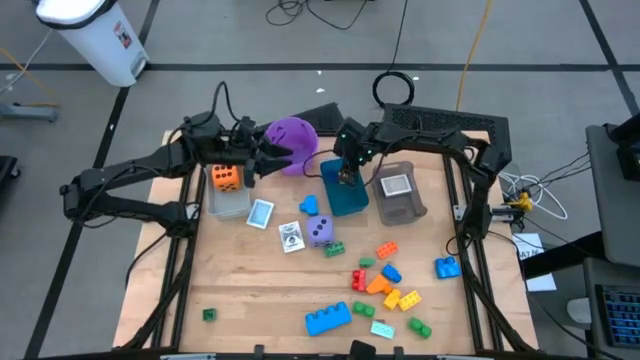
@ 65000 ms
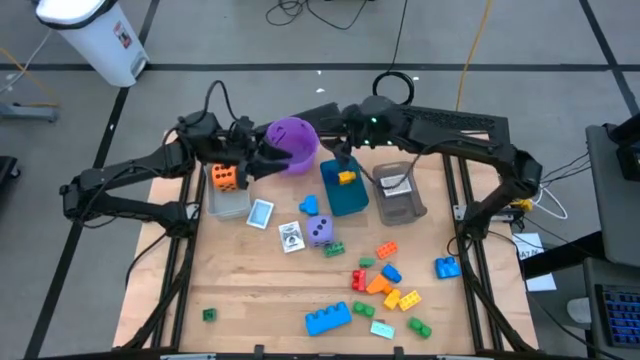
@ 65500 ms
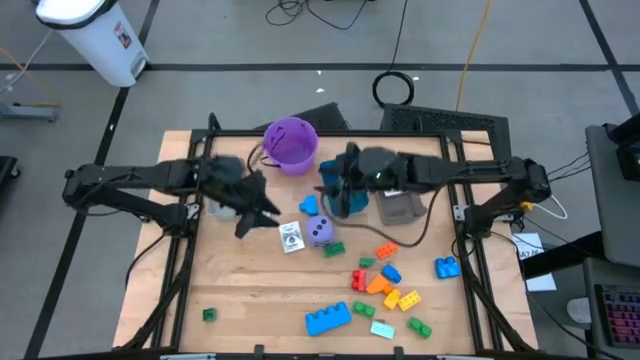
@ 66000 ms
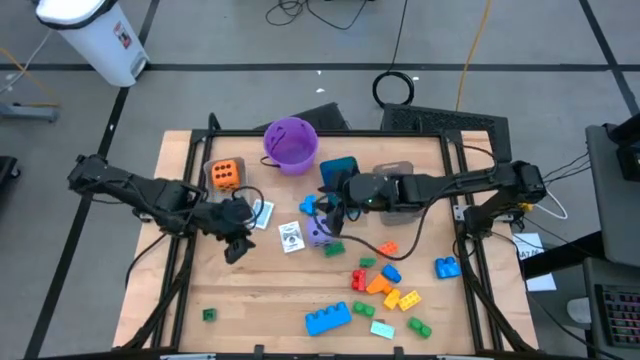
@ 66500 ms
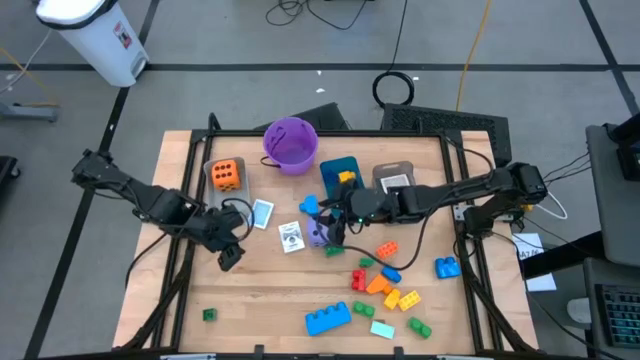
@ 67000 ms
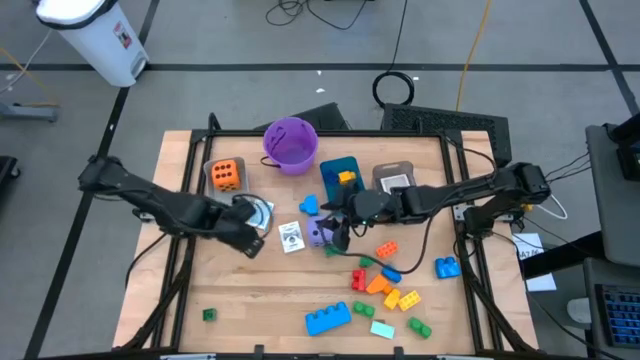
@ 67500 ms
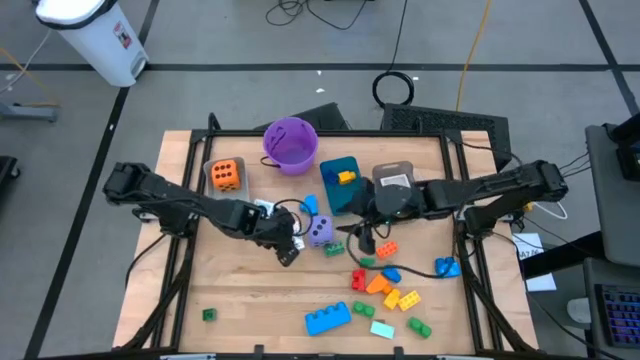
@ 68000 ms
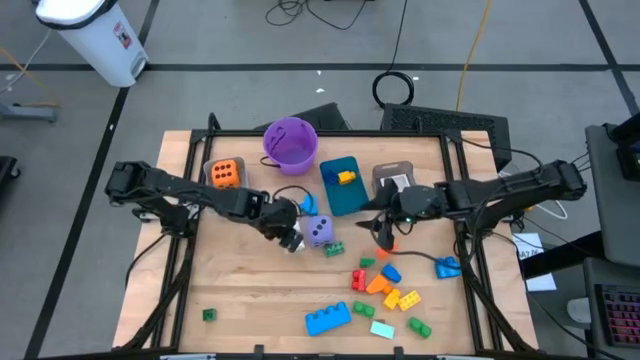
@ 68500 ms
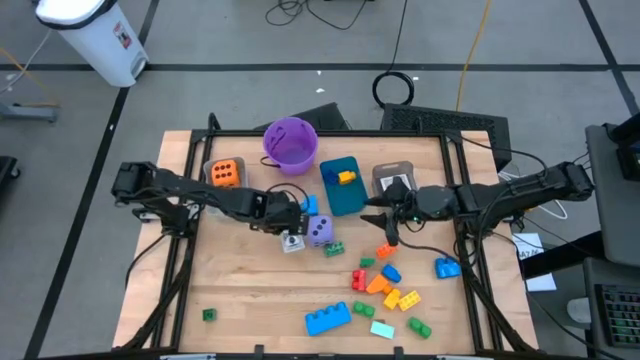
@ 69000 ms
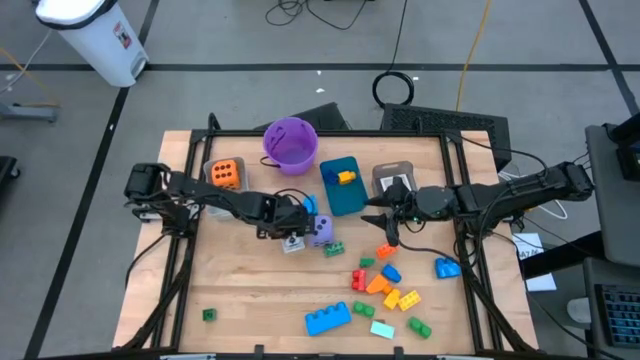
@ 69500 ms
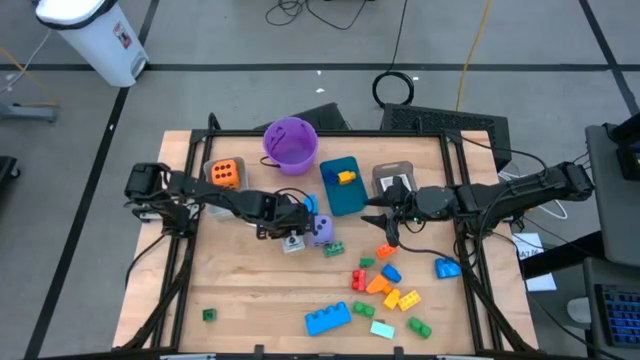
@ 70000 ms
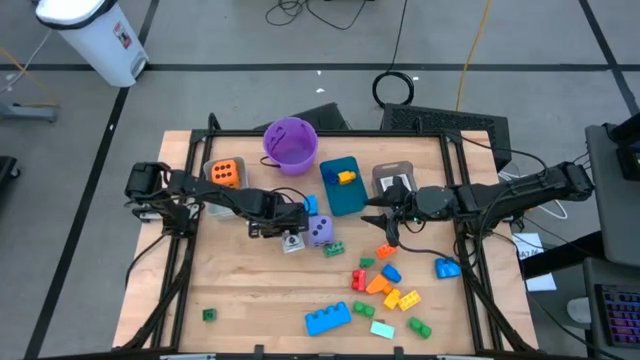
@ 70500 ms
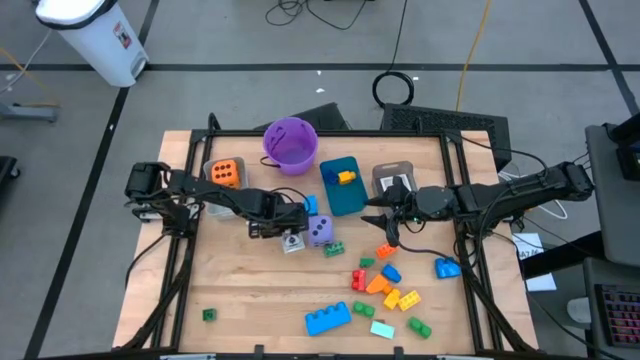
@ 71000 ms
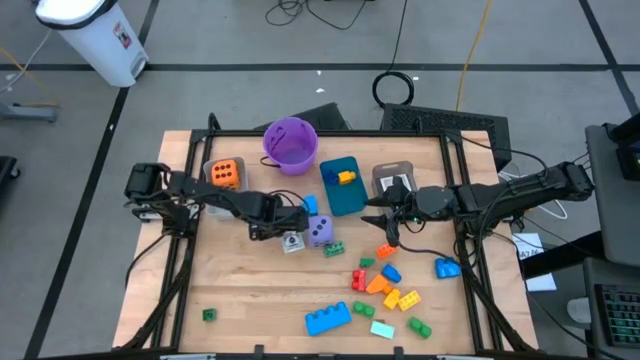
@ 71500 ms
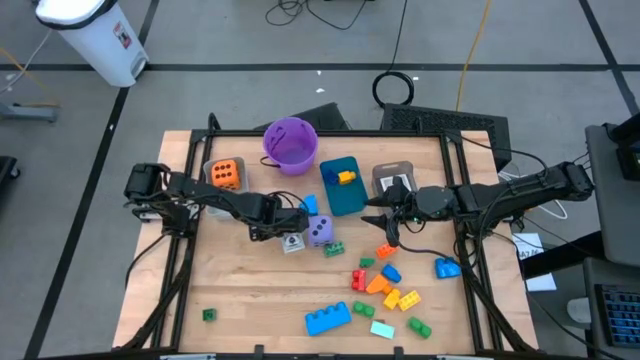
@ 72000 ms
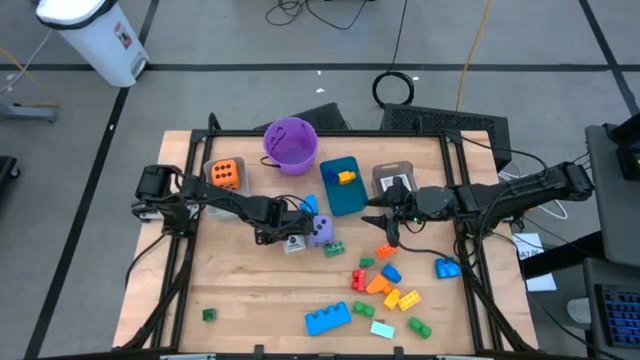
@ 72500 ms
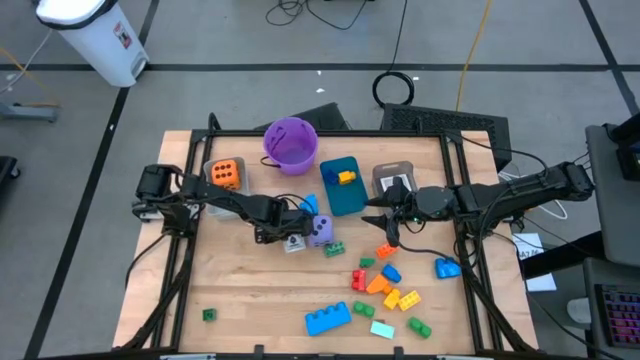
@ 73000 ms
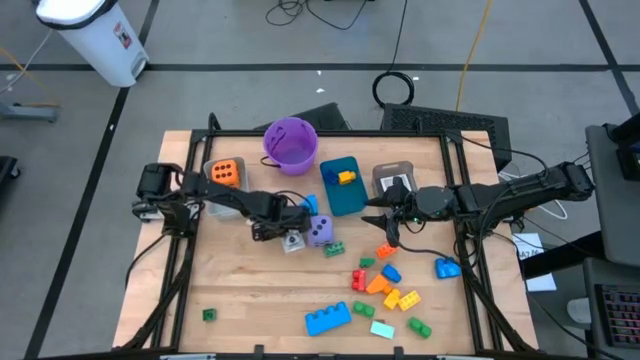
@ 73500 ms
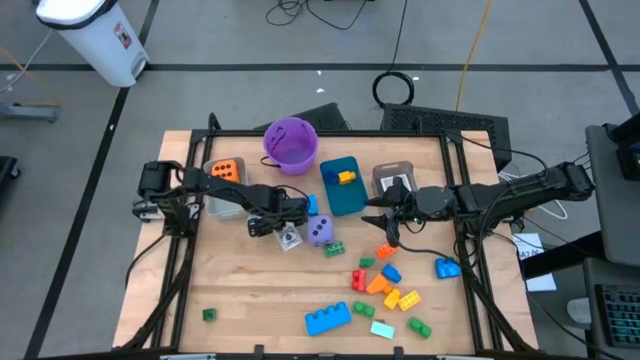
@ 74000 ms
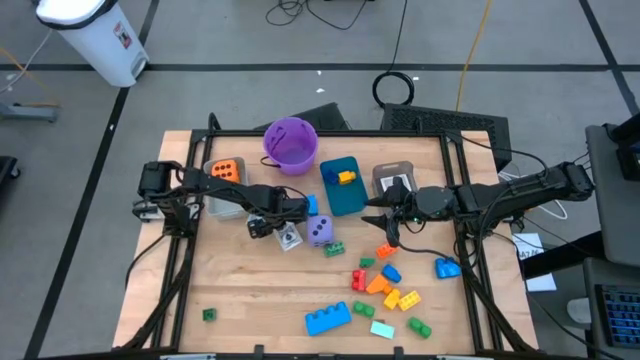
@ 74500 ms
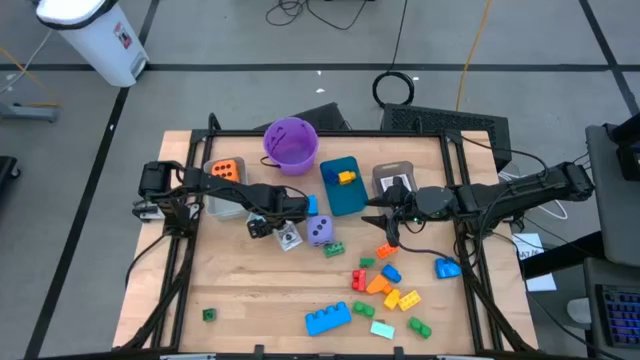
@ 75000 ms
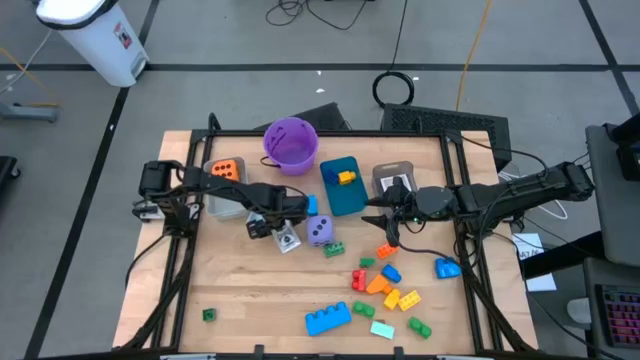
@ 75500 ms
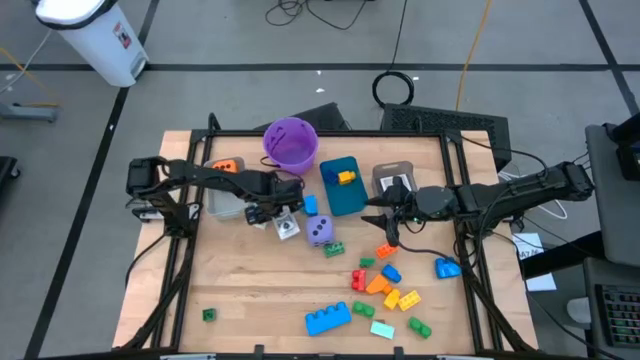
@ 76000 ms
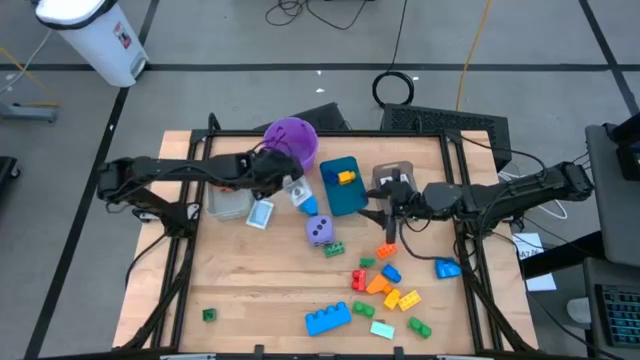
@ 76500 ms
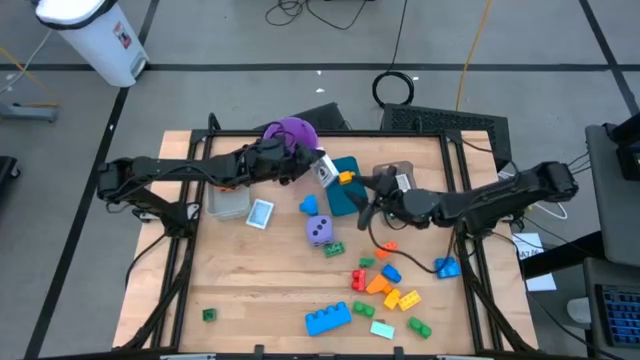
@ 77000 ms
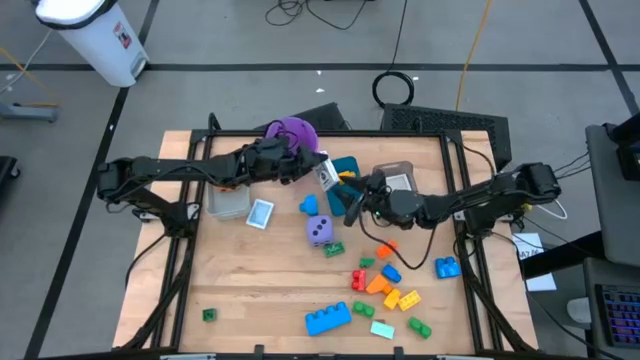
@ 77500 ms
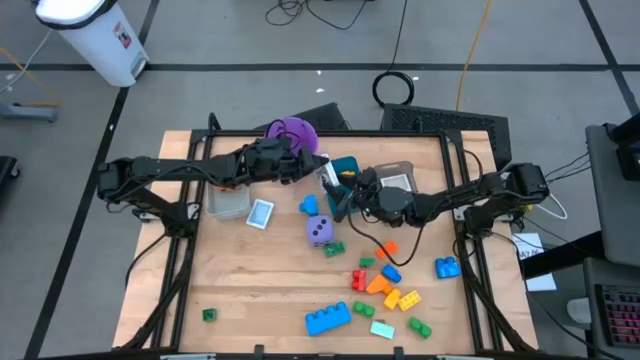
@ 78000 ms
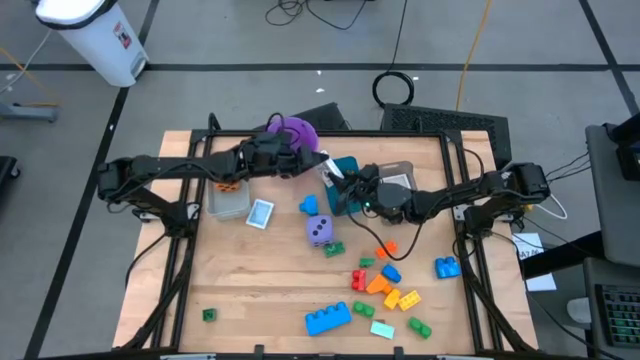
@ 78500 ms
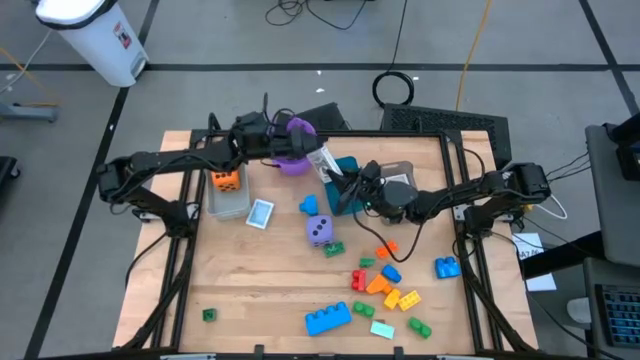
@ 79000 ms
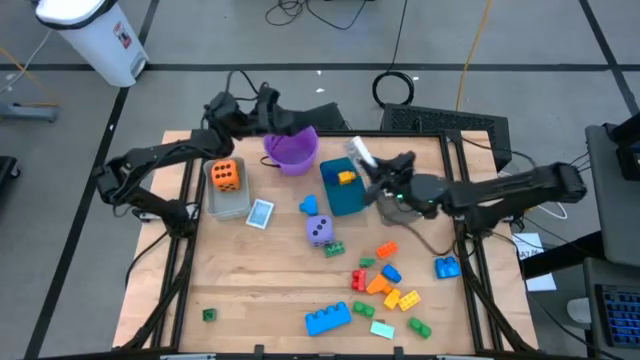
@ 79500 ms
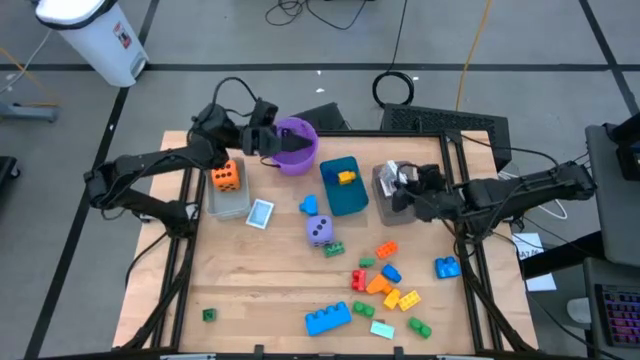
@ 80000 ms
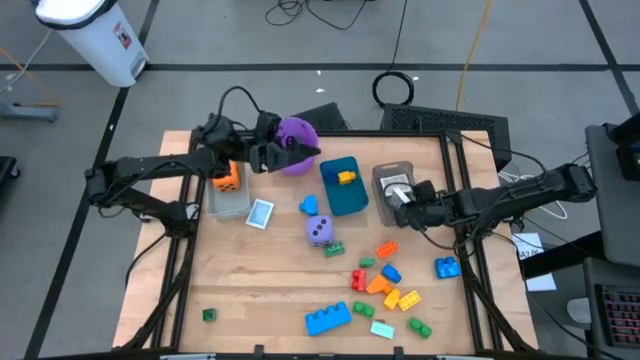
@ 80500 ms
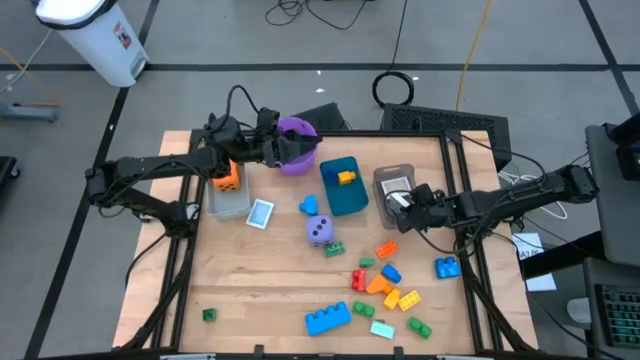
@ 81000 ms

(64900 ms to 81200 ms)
Task: Pick & Place Toys
Put the brown deck of cards into the black bin
